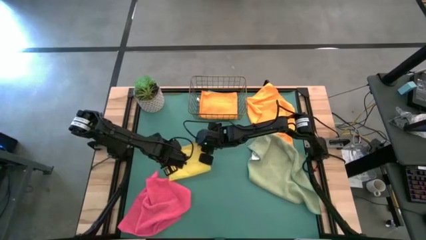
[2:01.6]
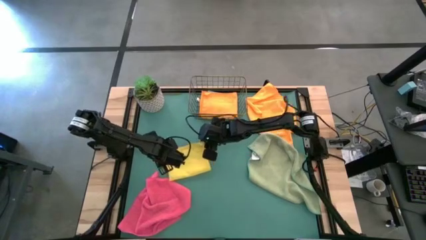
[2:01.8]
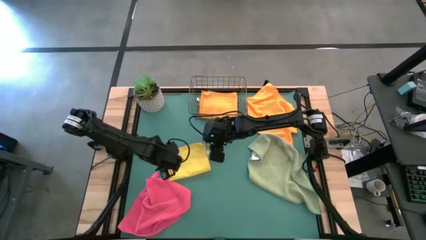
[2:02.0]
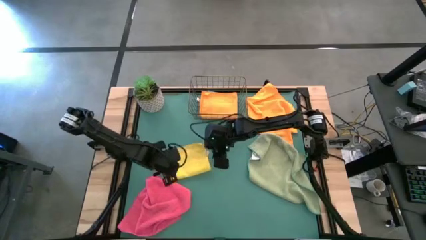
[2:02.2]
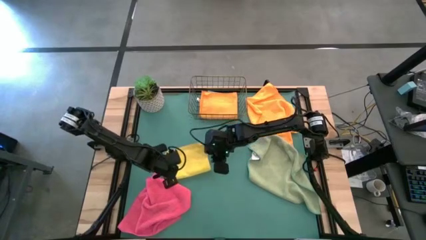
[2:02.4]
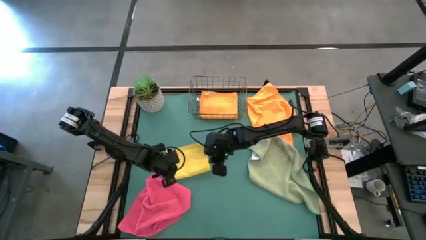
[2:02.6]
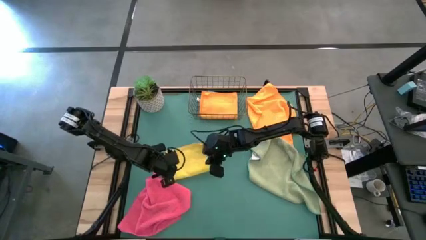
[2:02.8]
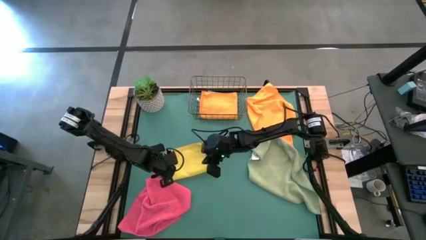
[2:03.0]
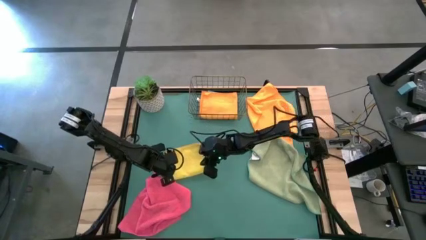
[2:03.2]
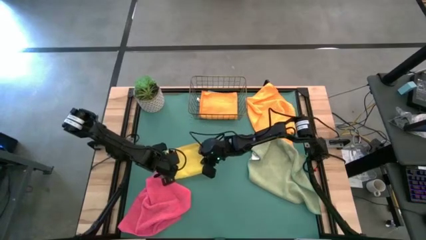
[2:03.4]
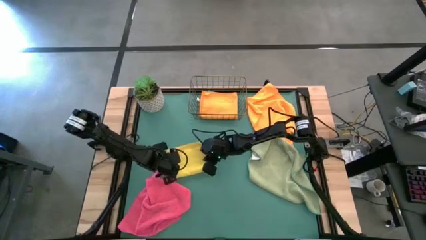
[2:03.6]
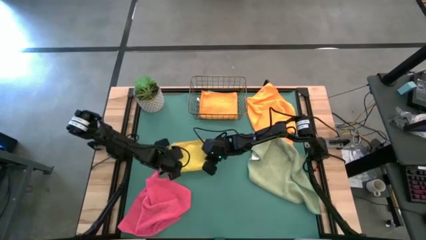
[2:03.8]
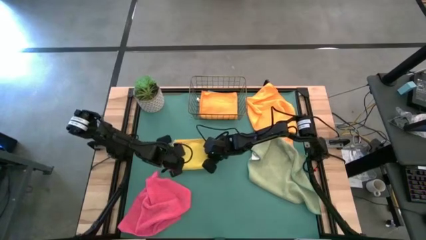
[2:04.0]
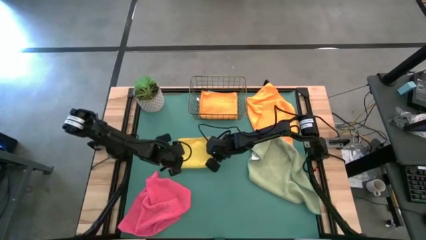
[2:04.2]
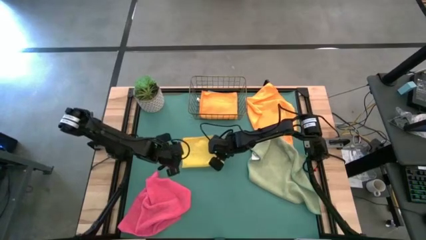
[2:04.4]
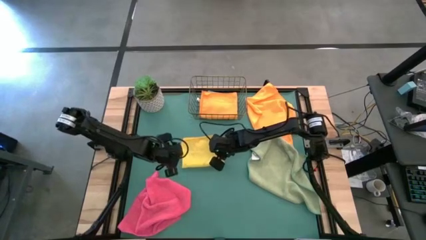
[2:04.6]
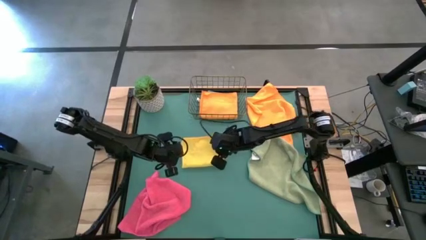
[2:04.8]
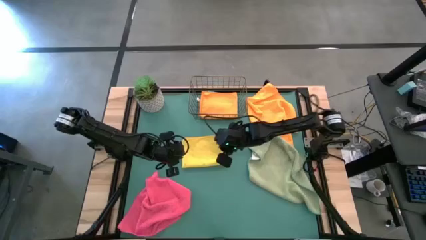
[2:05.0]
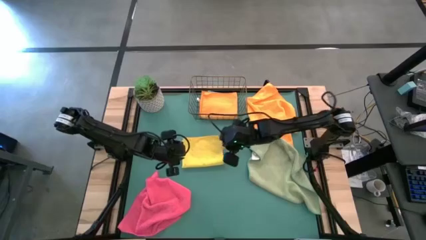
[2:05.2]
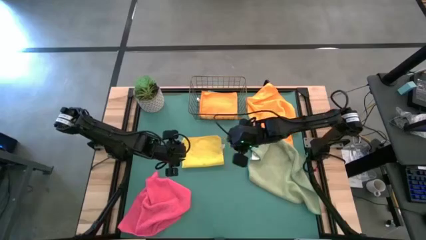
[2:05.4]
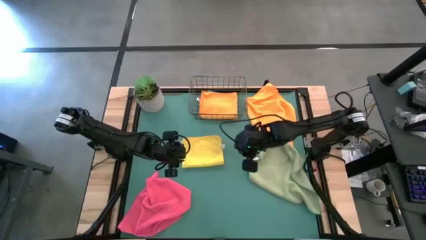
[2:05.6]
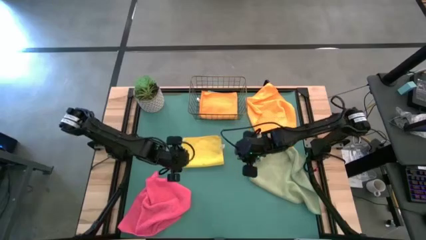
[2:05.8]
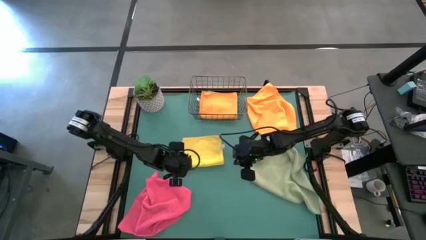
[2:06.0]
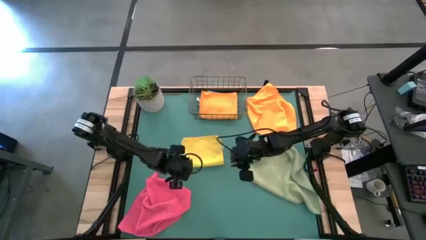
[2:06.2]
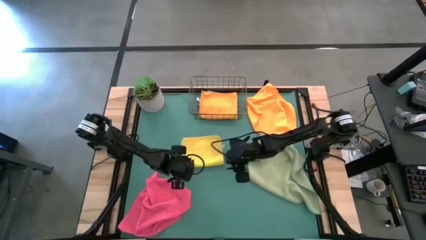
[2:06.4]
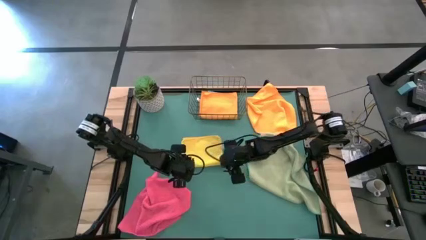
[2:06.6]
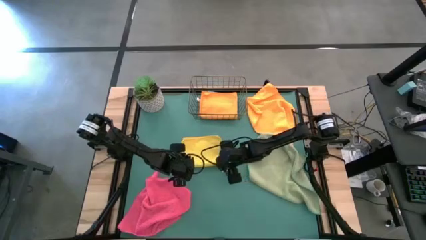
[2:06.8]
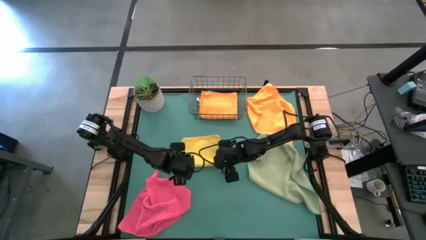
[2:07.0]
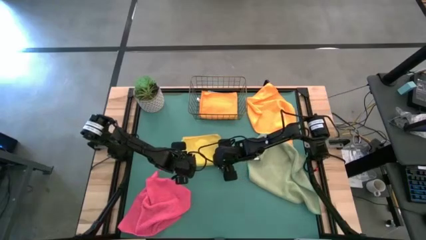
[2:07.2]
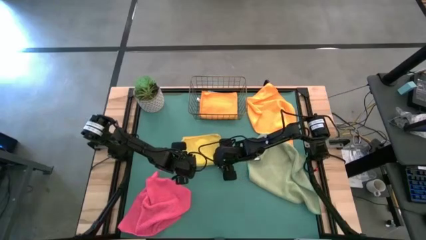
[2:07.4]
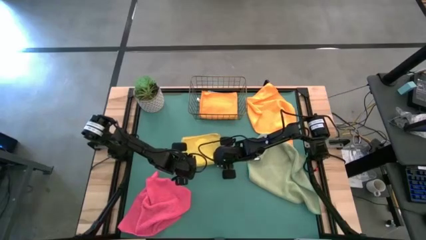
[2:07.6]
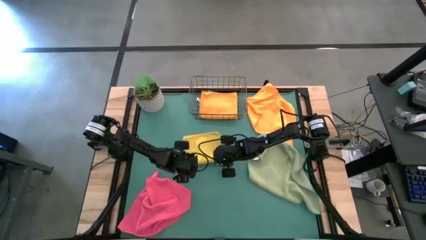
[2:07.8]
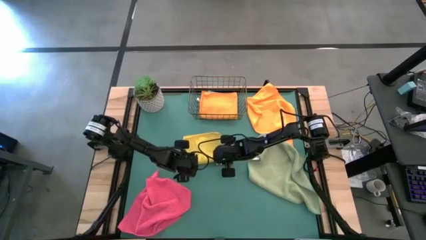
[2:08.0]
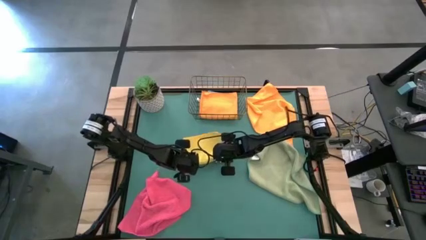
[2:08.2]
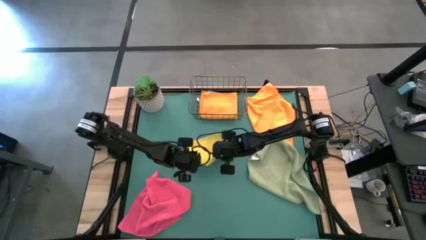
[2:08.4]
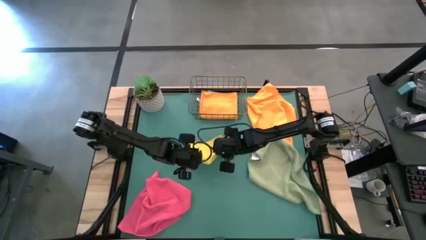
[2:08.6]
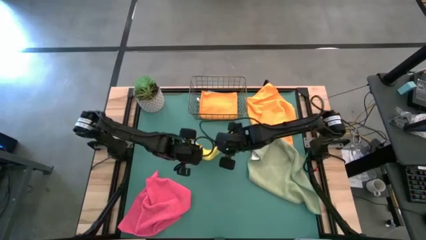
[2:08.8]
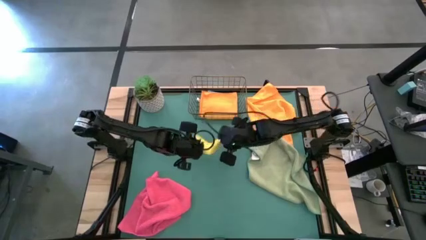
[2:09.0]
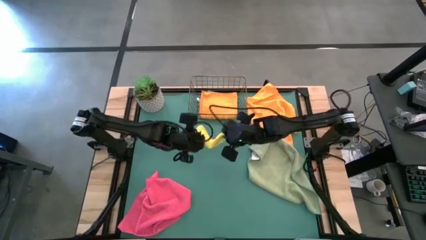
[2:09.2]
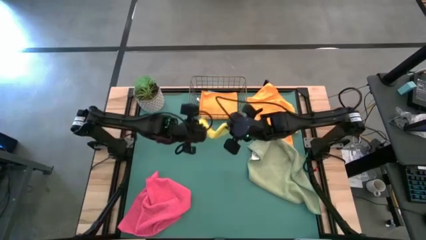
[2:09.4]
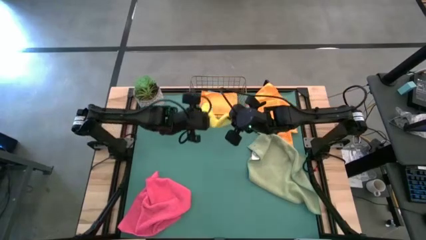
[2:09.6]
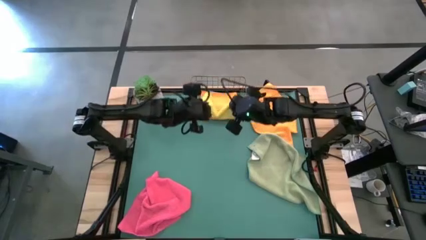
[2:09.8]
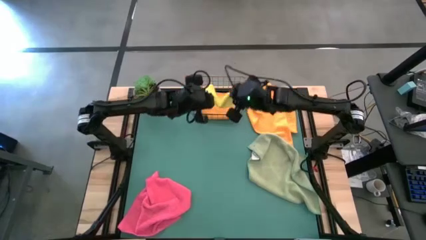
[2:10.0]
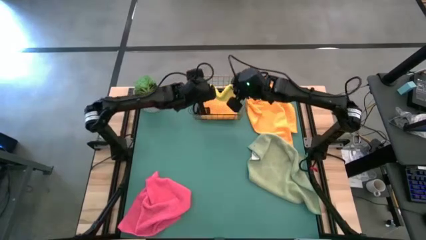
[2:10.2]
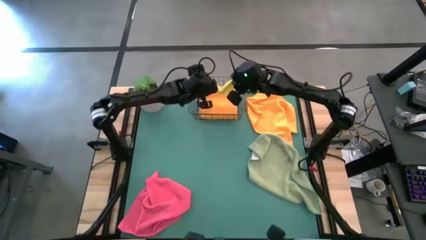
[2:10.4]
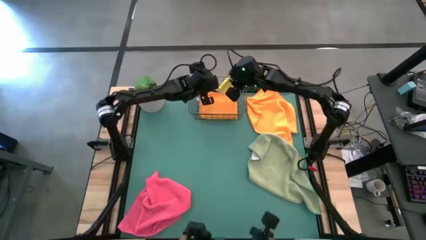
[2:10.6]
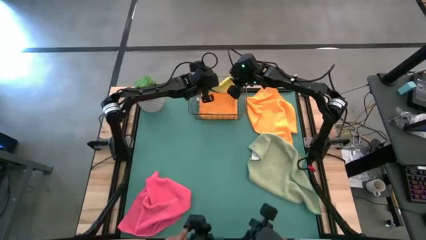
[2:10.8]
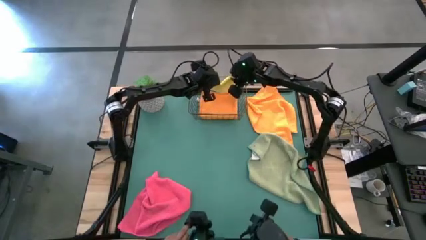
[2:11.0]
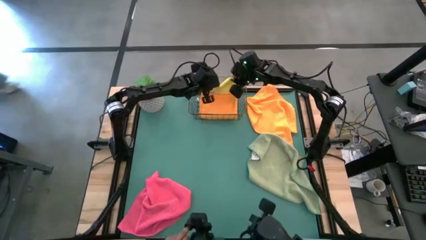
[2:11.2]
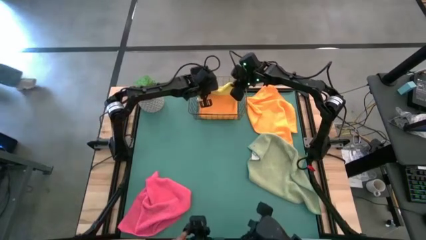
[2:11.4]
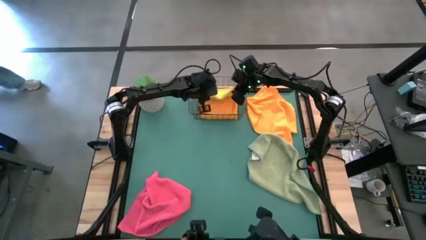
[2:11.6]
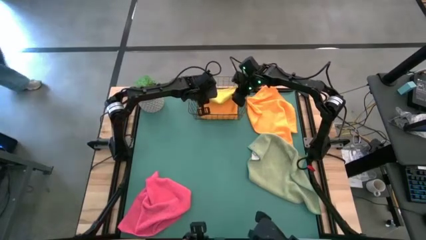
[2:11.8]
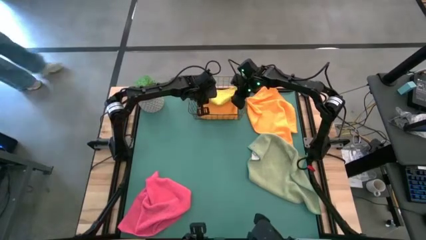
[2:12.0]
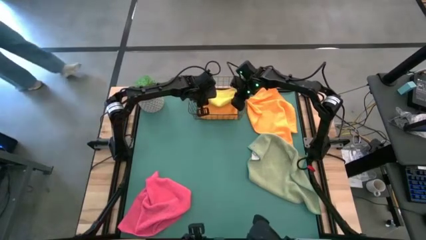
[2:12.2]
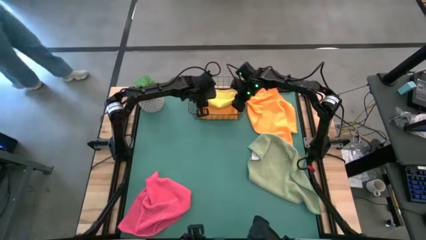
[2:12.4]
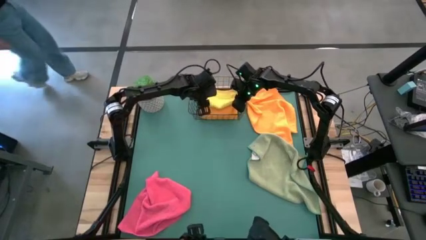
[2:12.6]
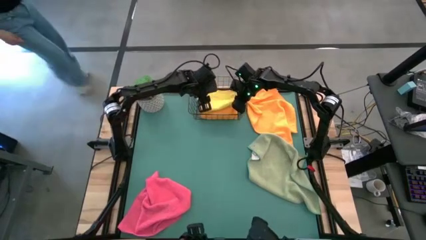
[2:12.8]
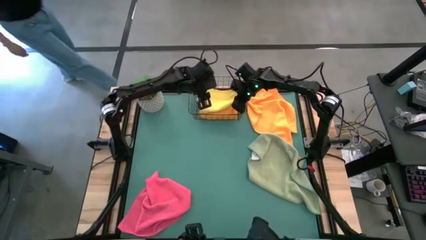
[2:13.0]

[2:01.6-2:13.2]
Task: Fold microfiber towels
Put the orange microfiber cloth into the wire basket

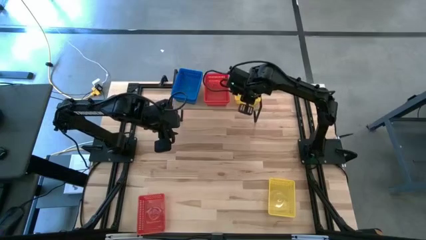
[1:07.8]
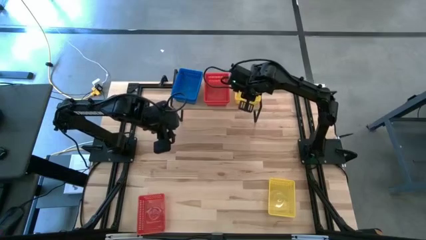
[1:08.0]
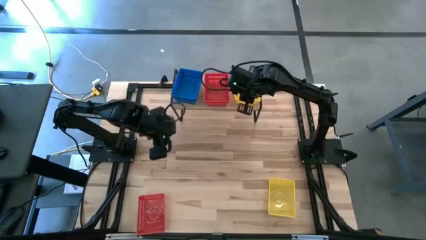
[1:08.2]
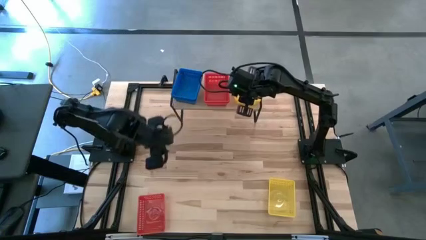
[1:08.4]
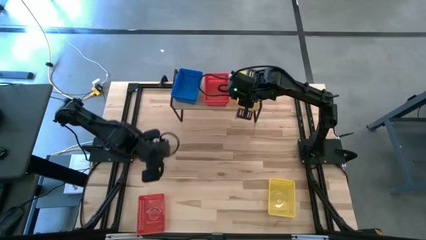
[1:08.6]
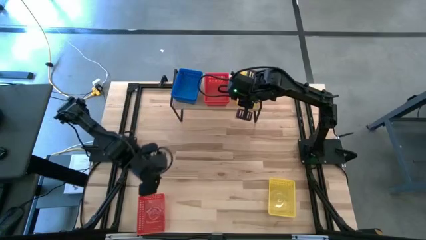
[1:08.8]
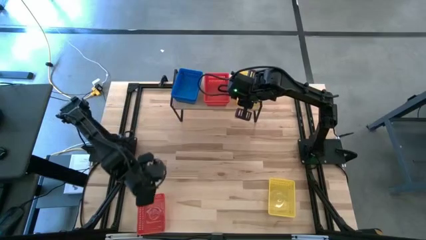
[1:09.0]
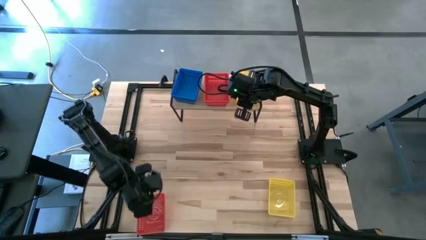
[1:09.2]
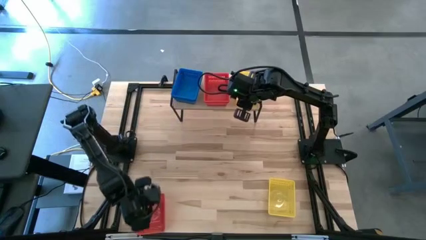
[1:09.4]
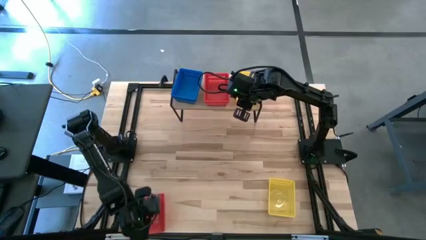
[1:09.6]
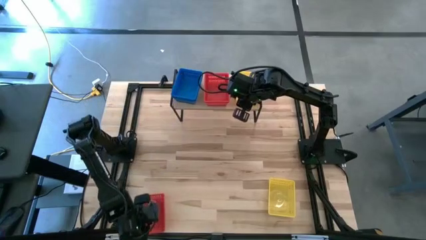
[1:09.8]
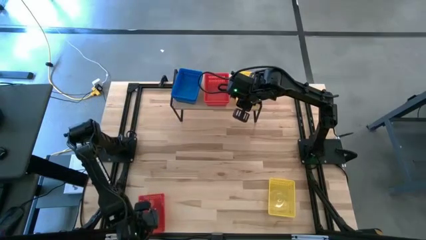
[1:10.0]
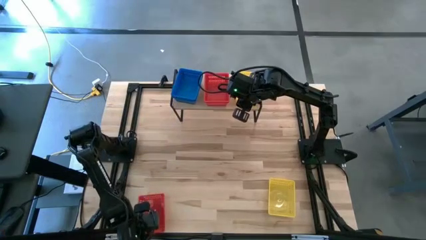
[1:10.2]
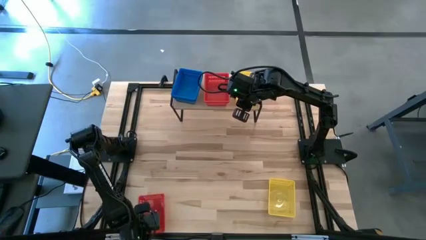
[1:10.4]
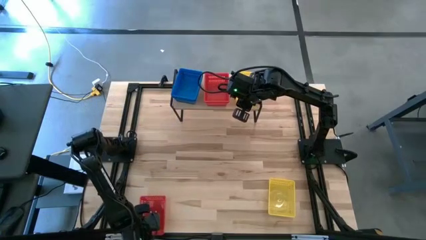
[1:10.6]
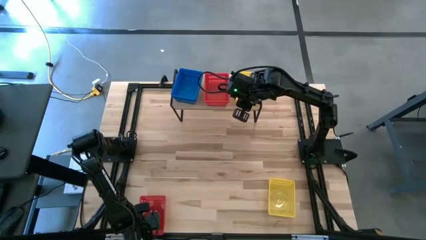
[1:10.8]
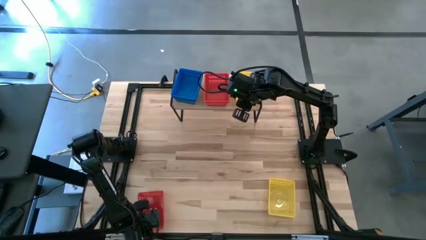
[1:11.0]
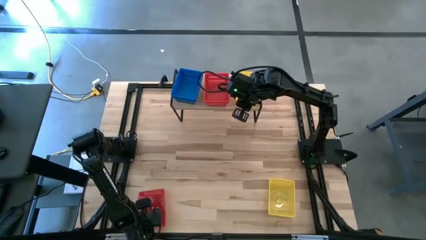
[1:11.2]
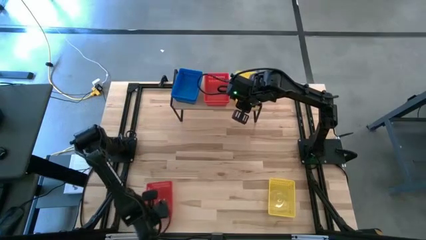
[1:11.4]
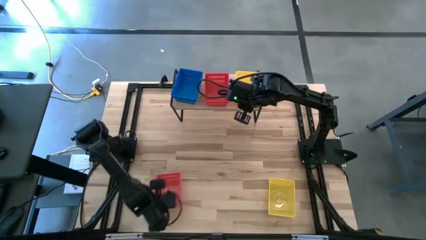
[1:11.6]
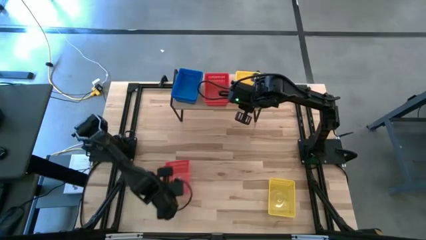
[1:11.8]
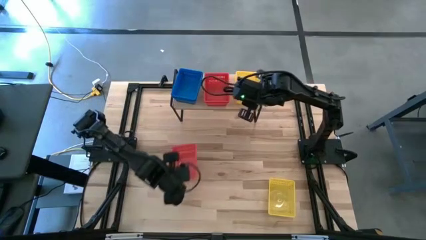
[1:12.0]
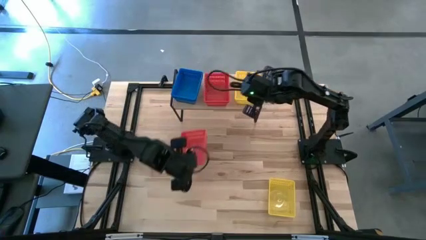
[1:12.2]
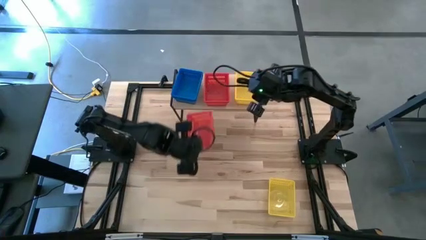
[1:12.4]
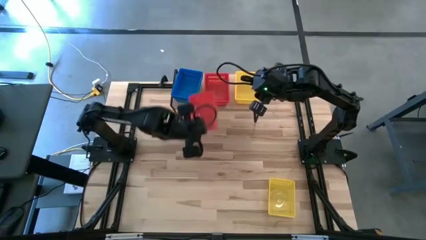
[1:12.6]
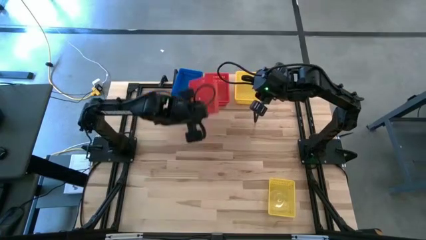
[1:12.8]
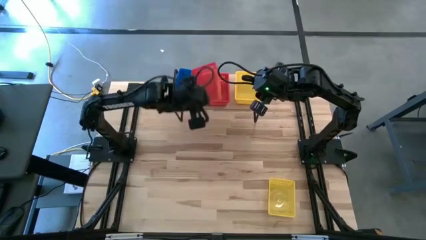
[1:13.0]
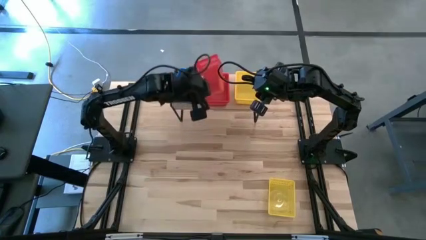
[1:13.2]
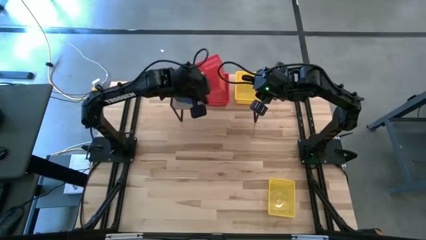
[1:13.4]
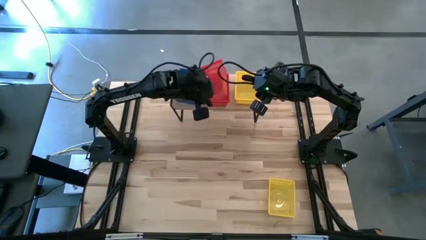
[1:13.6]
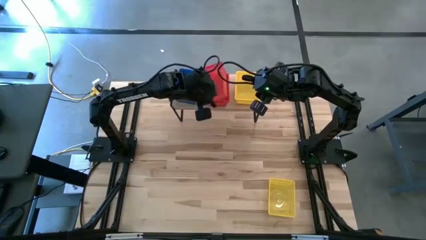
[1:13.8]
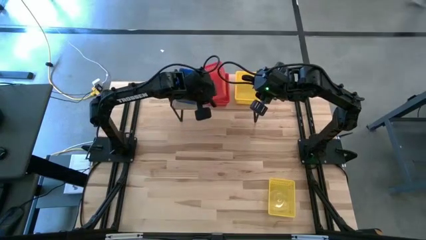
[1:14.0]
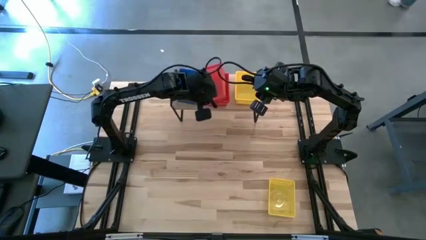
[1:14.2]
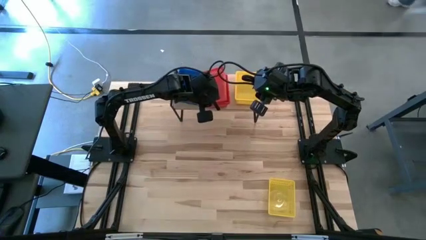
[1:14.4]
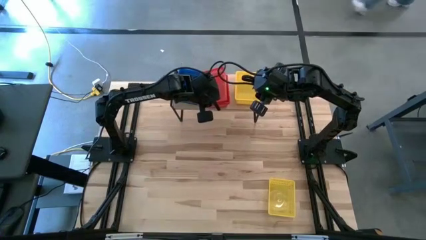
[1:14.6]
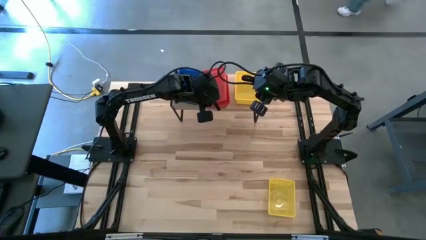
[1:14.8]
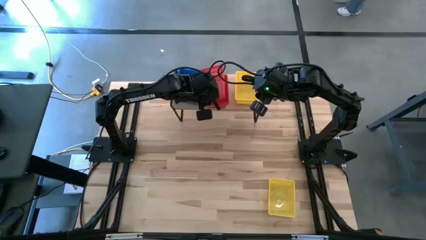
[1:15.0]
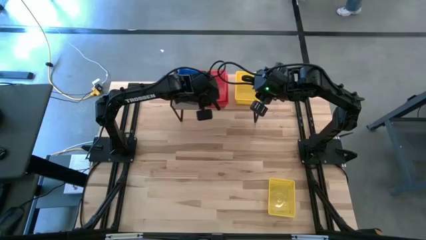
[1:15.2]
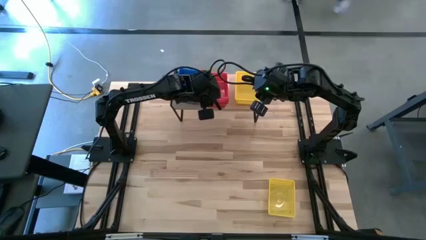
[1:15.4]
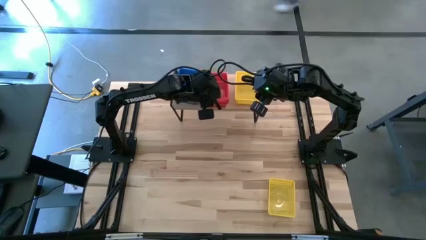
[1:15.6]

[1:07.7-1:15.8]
Task: Stack baskets on shelf by color
Stack the red bin on top of the red bin on the shelf
